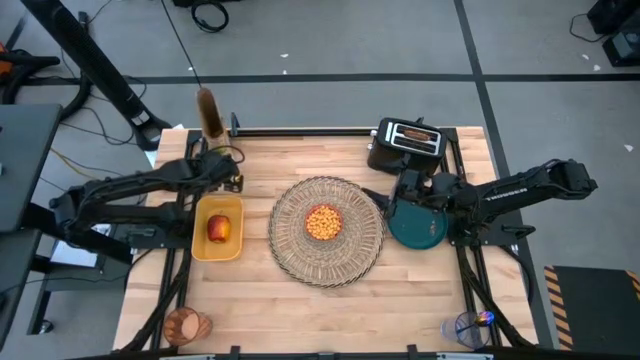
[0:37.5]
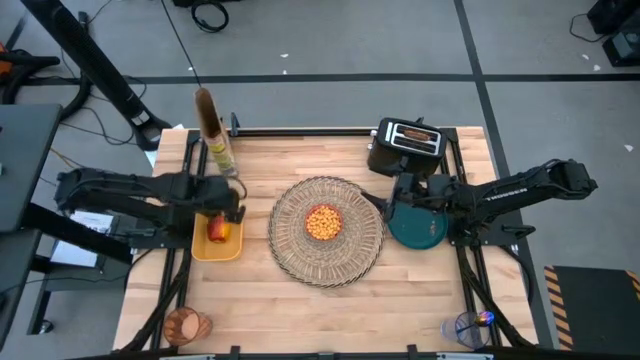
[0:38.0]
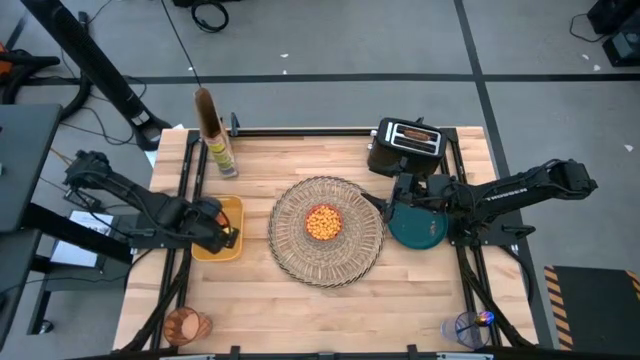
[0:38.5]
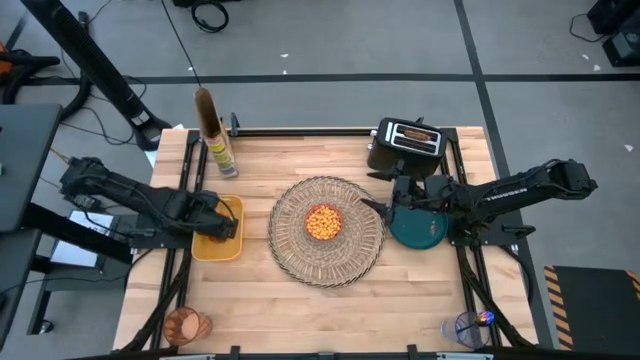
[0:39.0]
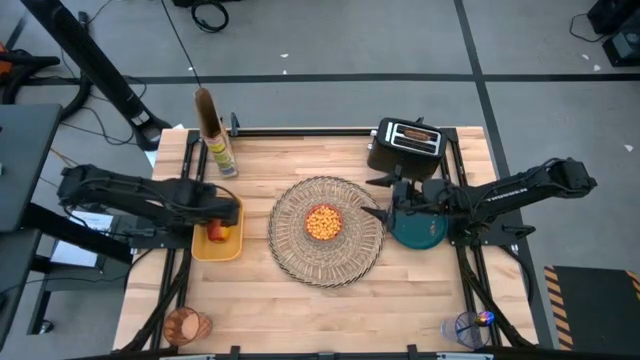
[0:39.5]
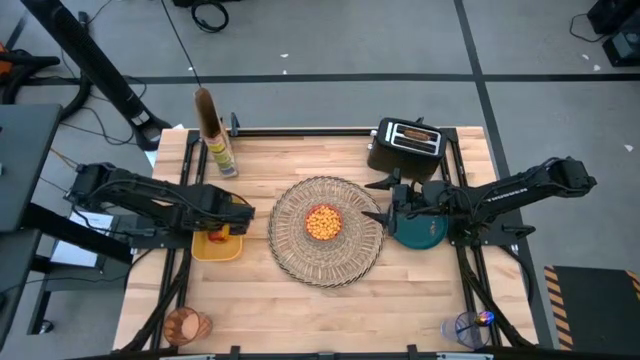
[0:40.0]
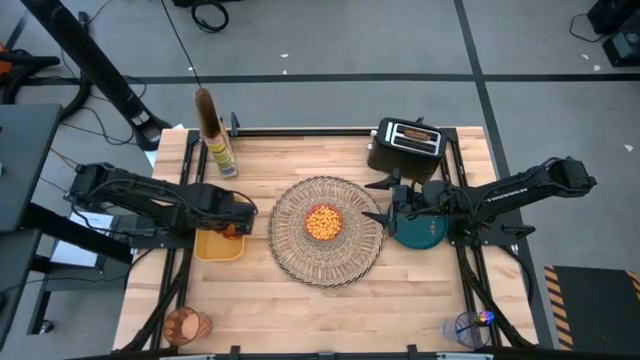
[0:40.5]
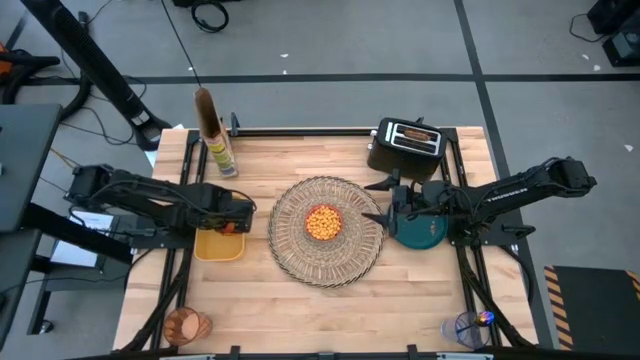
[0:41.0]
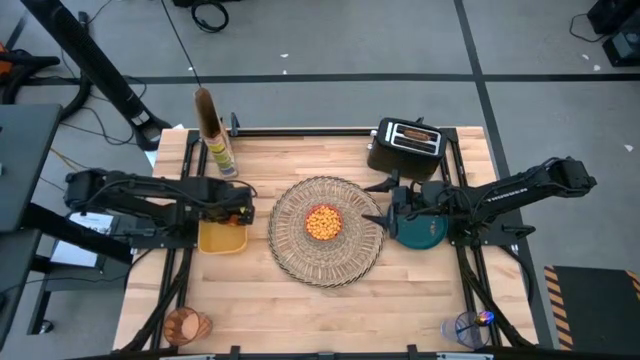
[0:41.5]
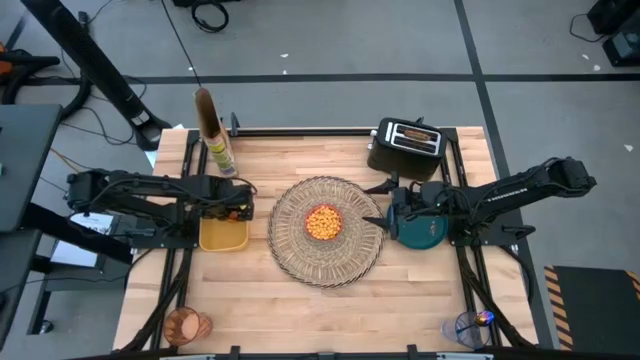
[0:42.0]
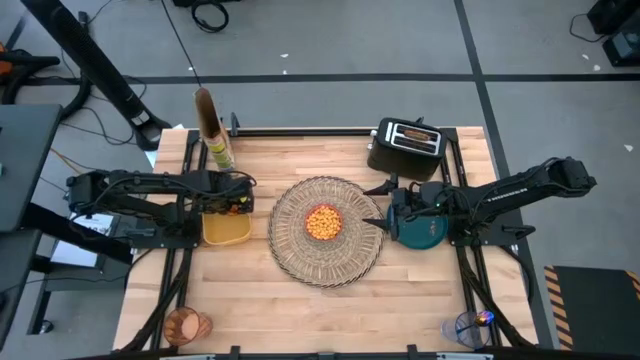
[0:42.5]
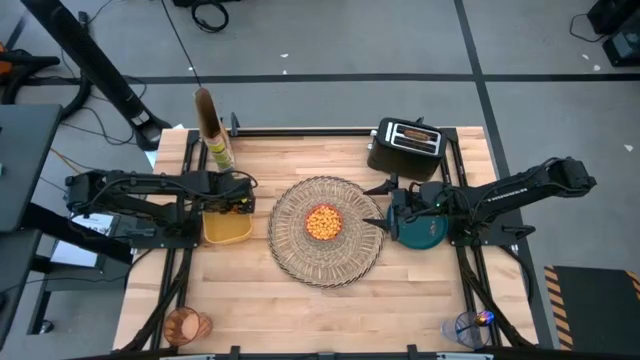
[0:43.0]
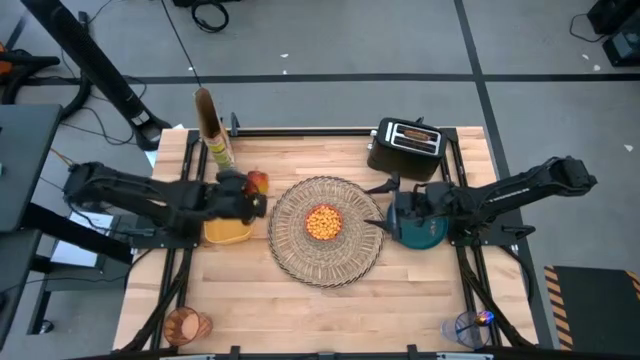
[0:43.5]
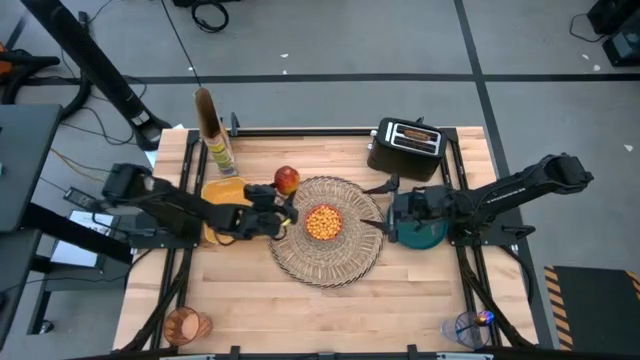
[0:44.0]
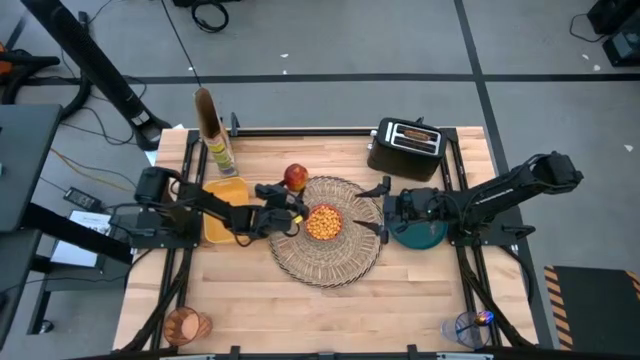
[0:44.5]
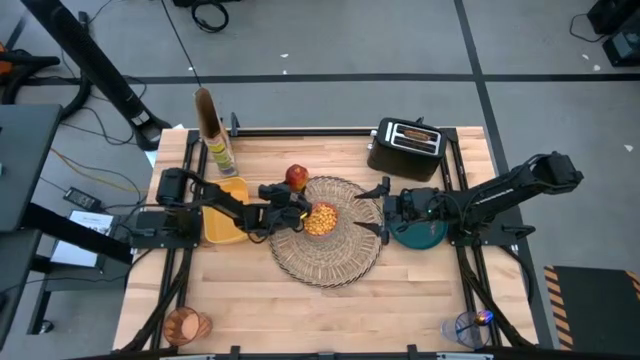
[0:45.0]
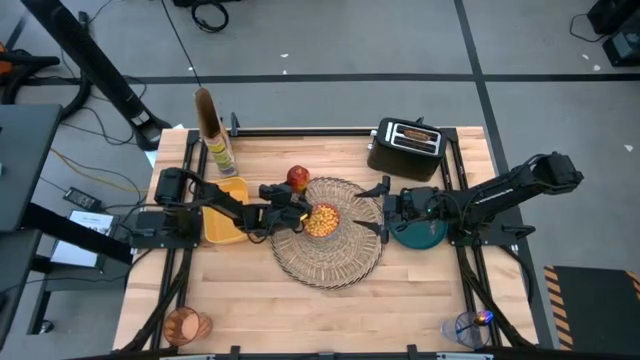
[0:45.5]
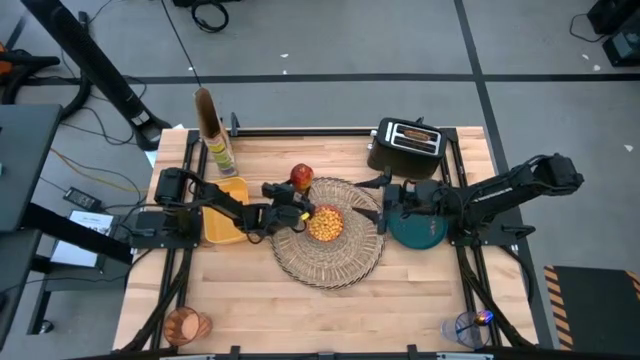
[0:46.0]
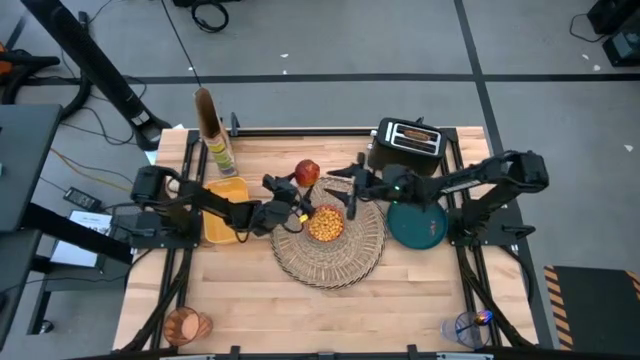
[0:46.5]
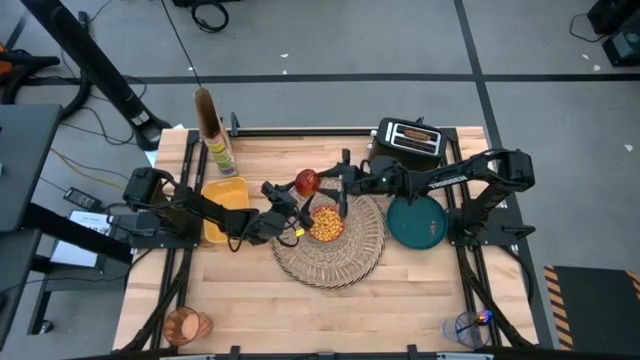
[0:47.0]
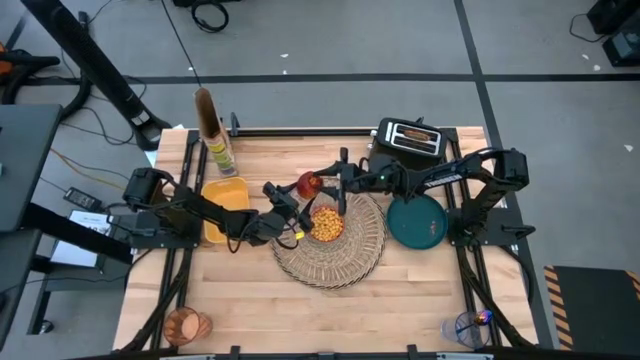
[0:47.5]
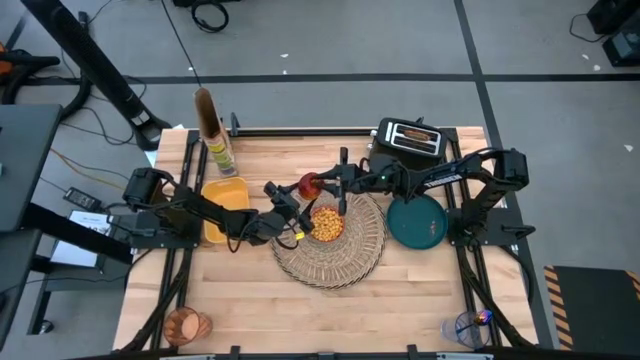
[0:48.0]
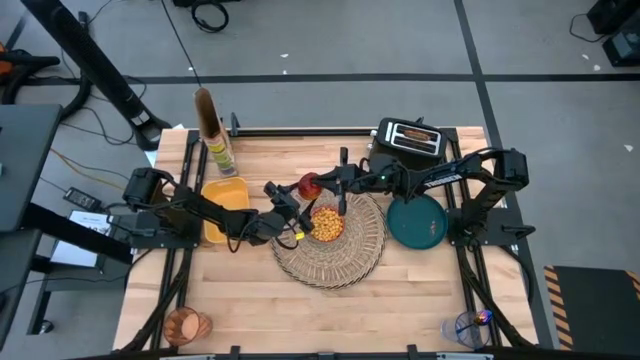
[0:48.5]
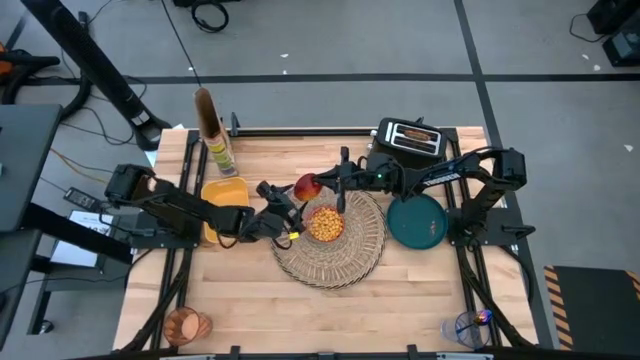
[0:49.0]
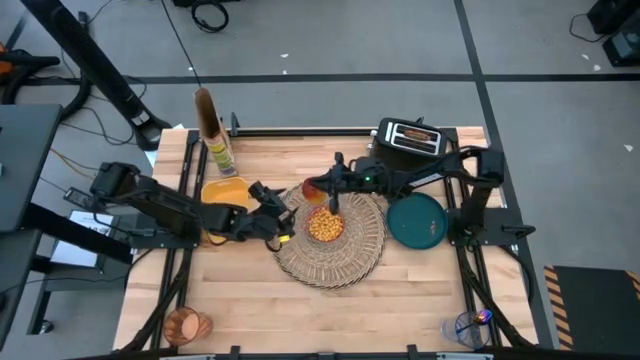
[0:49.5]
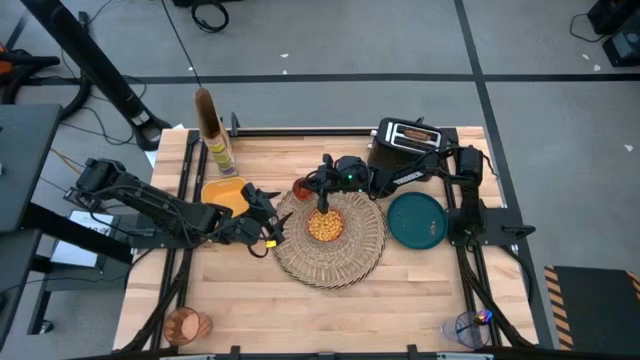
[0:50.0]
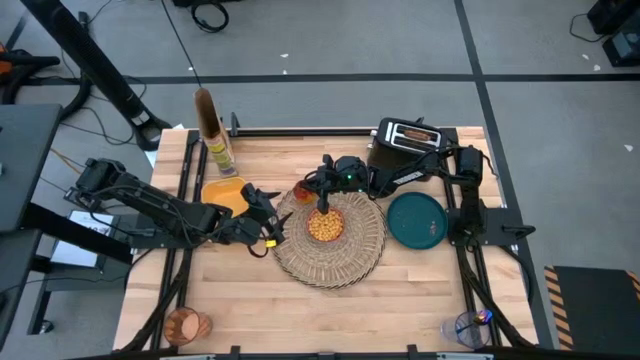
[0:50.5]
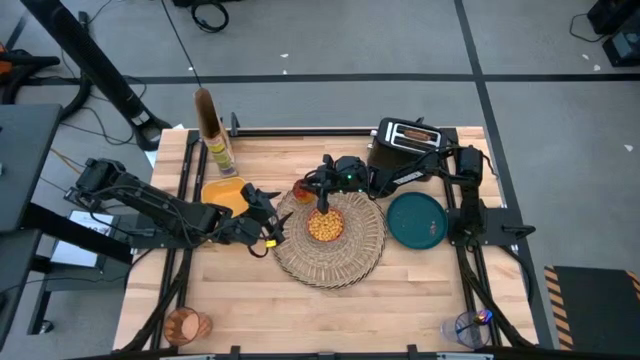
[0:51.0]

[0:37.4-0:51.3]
Task: Arrange a breakfast setting
Put the red apple to the top of the red bowl on the brown table mat

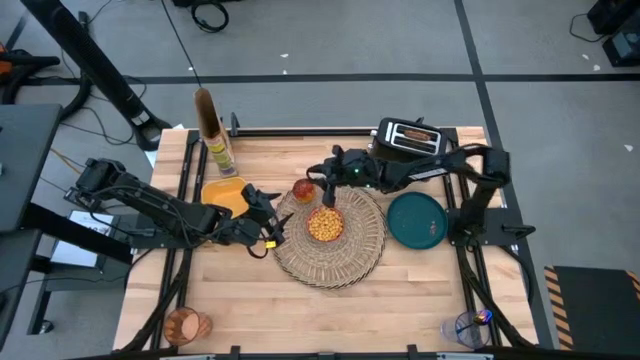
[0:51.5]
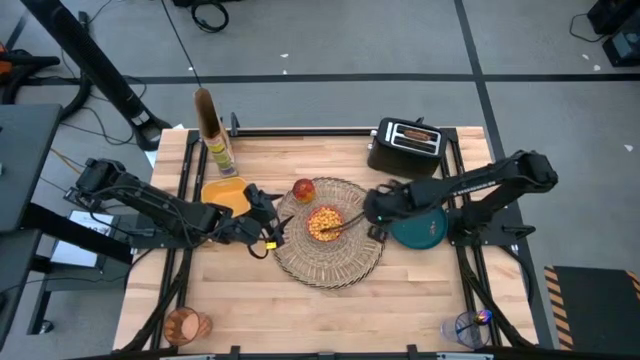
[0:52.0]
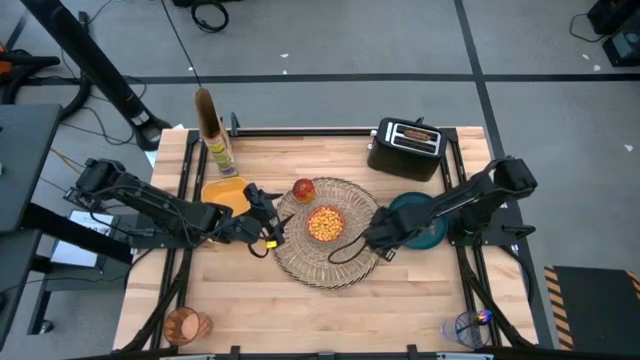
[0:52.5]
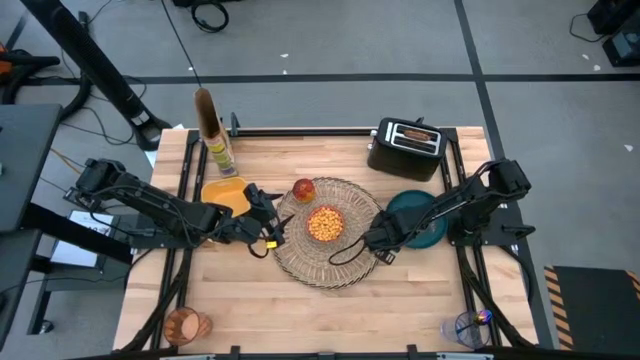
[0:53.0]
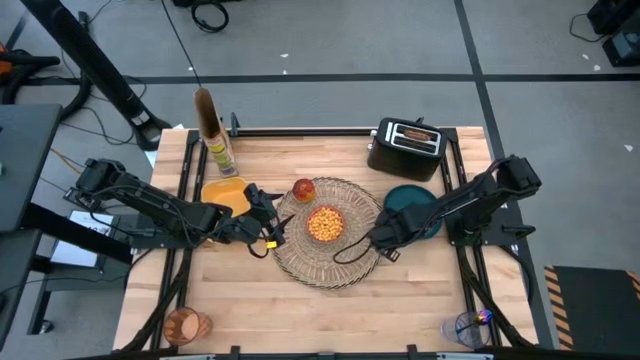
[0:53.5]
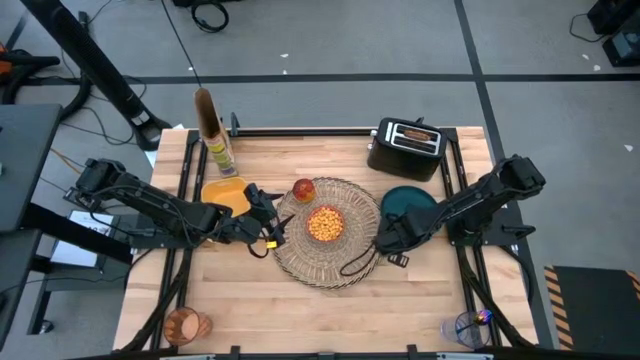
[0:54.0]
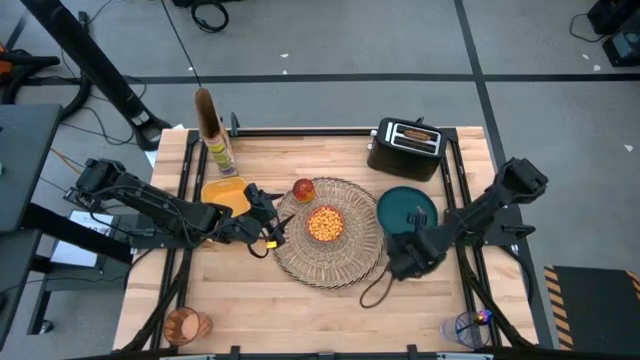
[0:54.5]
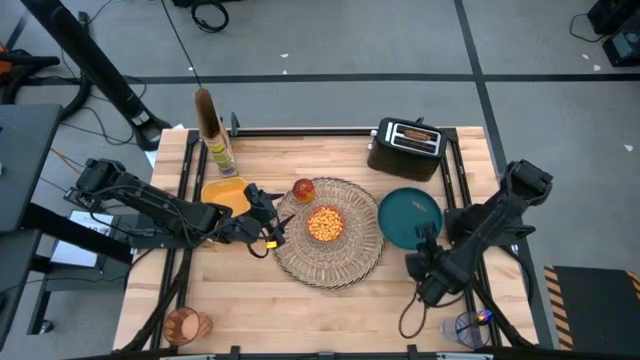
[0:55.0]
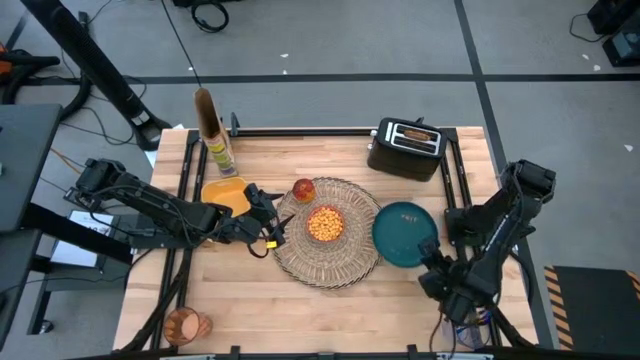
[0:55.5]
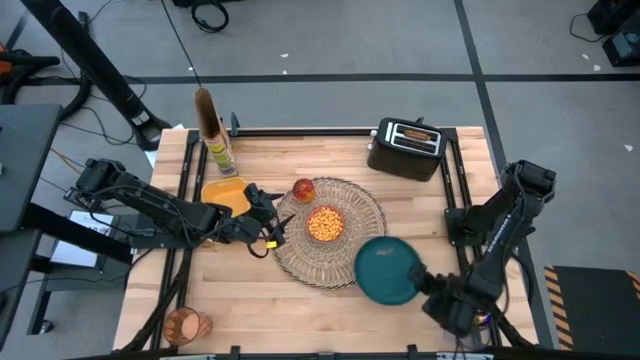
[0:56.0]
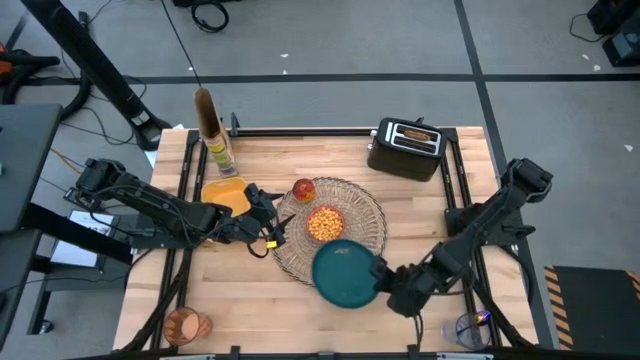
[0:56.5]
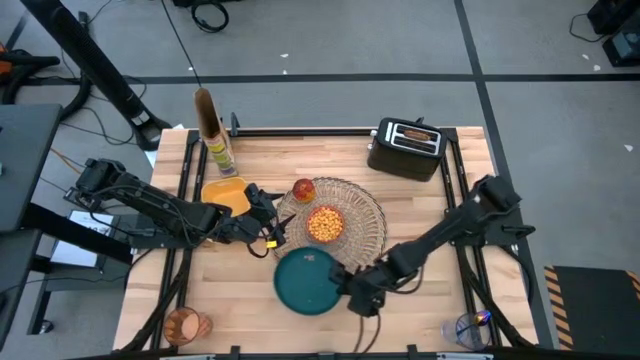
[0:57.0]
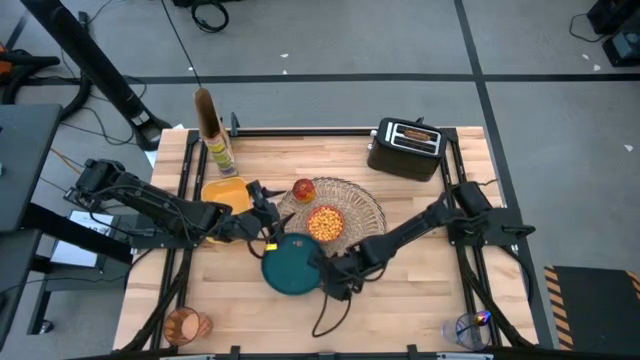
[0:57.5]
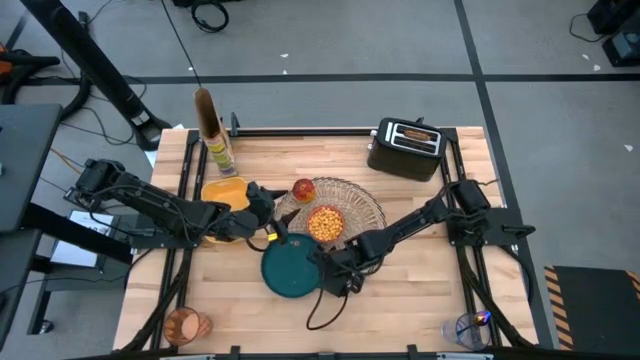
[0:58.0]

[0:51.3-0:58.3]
Put the blue plate to the bottom of the red bowl on the brown table mat
